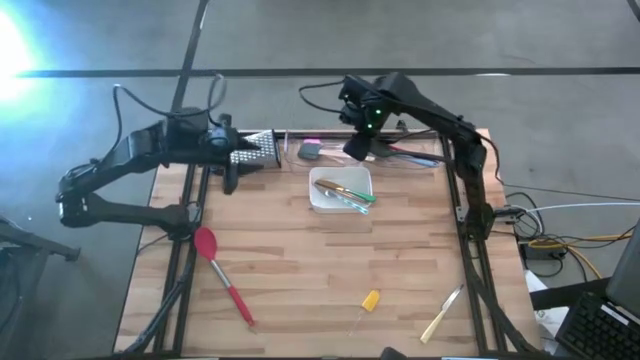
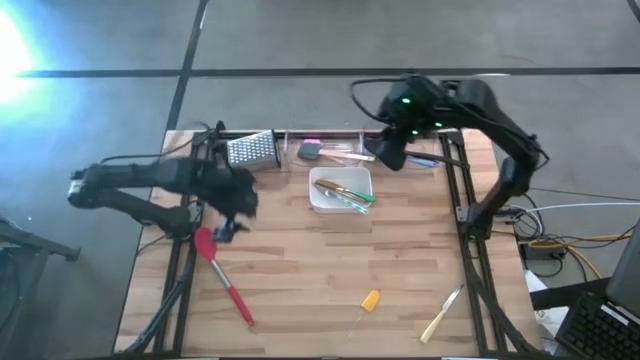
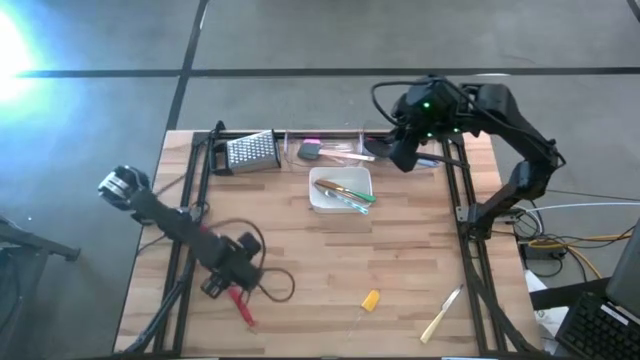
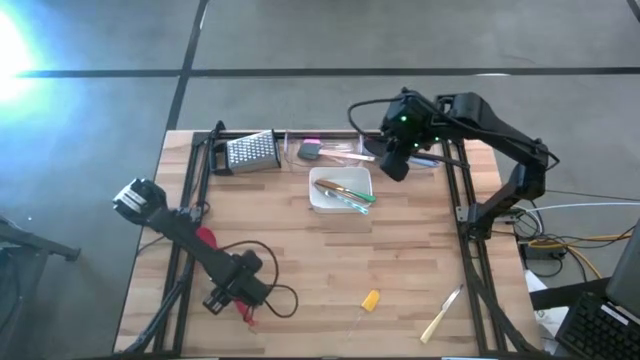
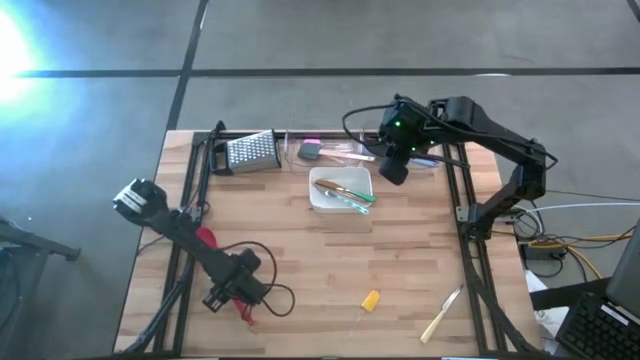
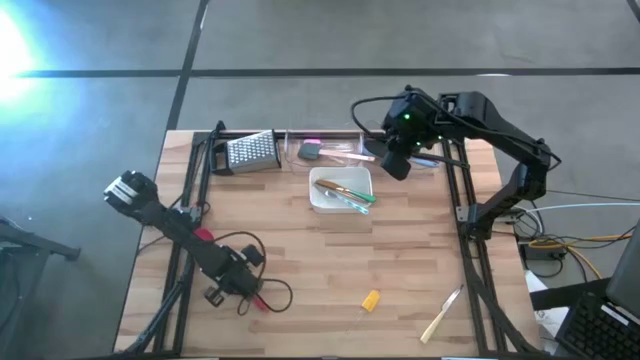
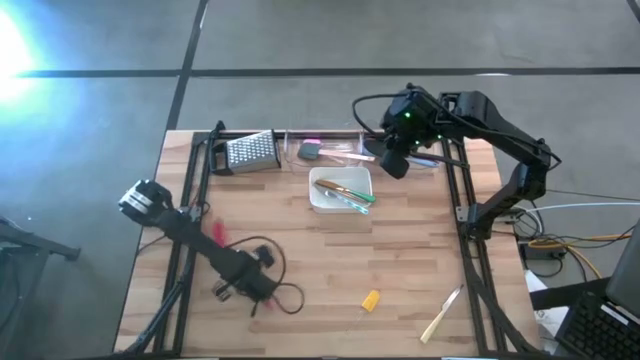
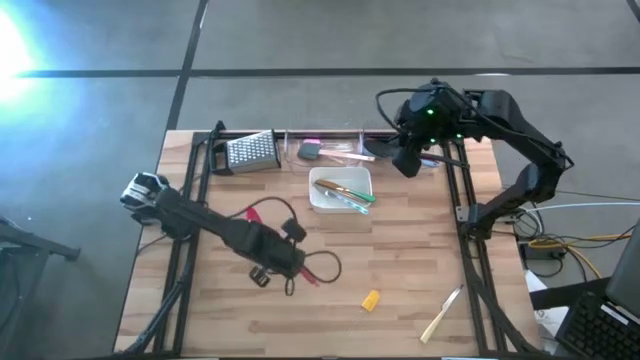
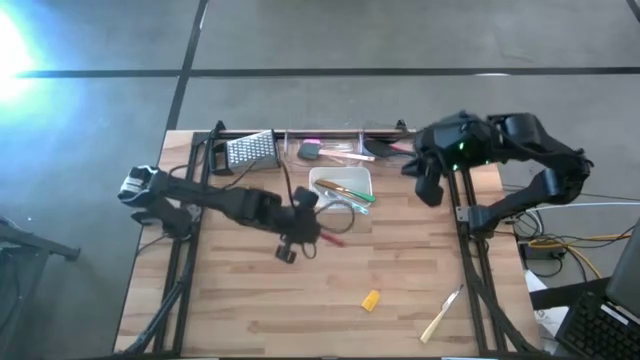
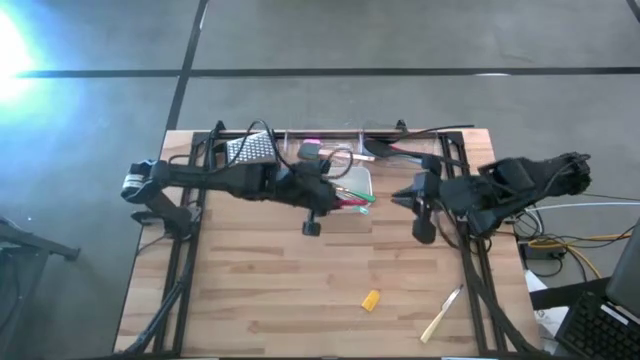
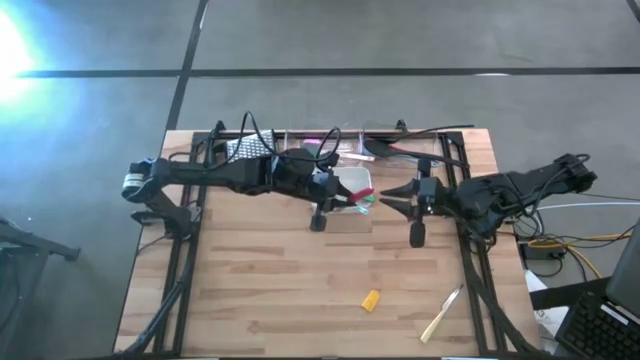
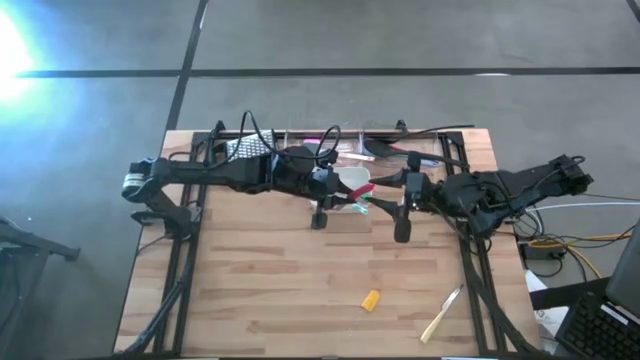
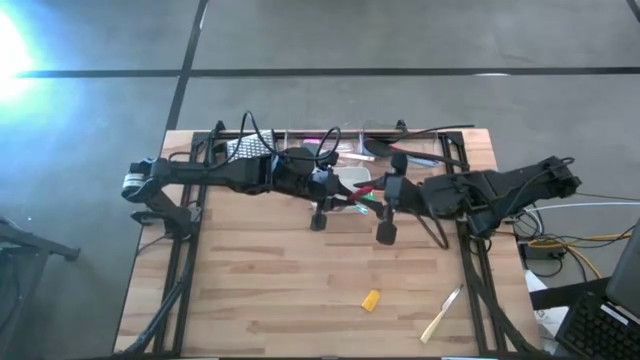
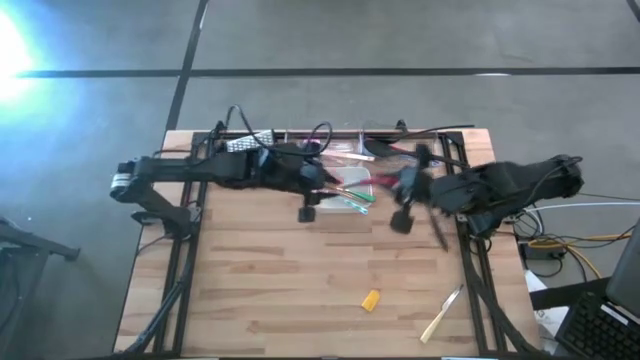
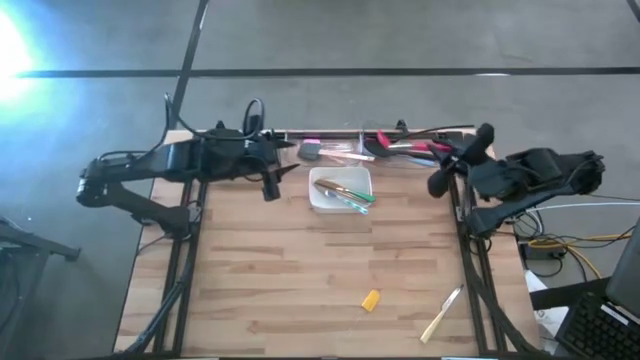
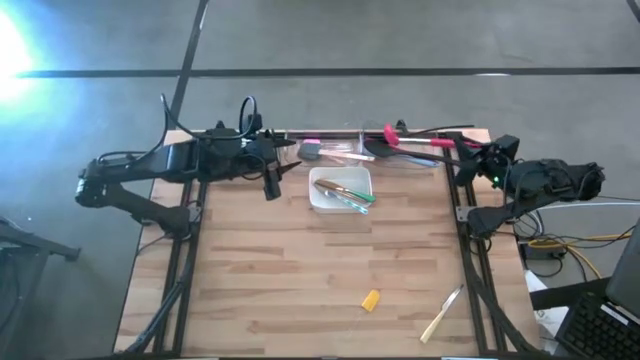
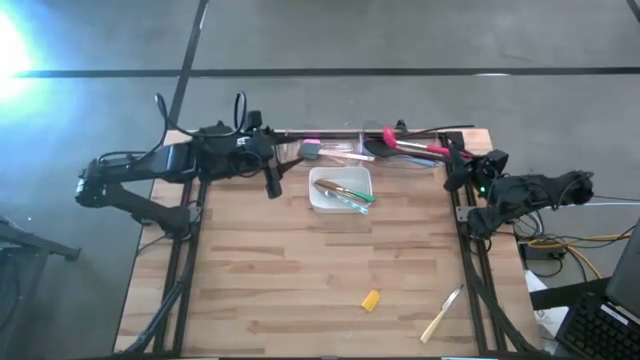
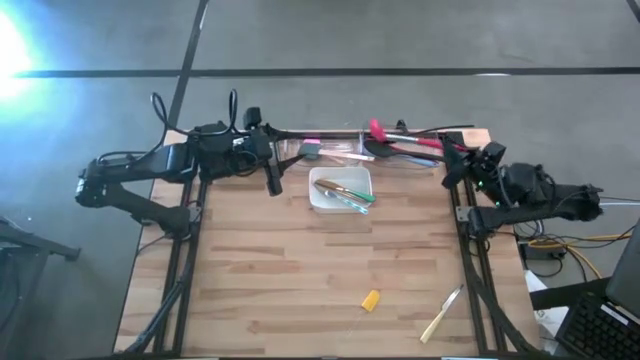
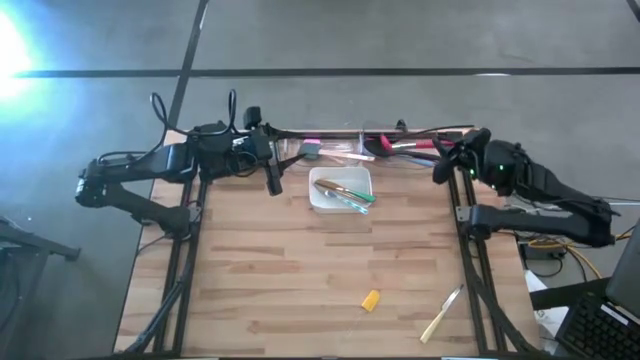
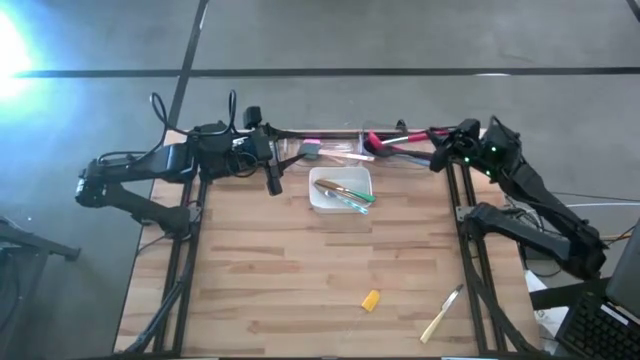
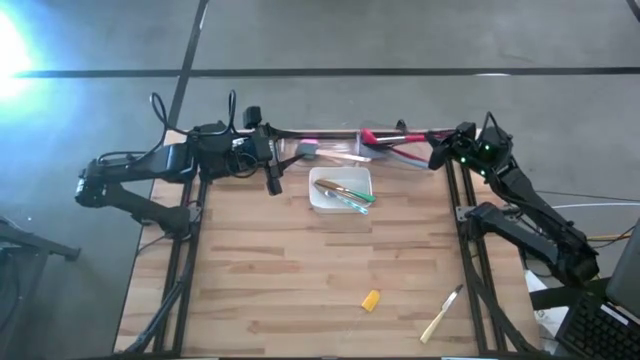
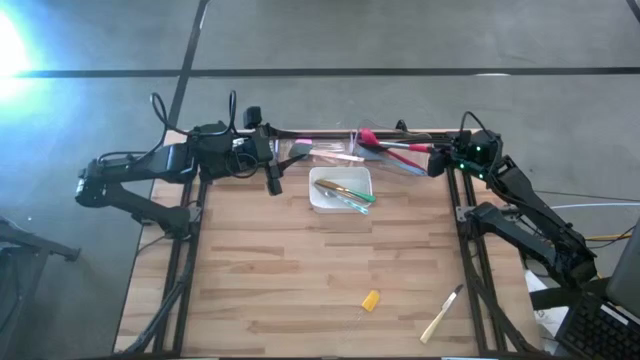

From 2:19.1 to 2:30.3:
Task: Pick & Place Kitchen Items
Put the pink serving spoon into the right transparent bin

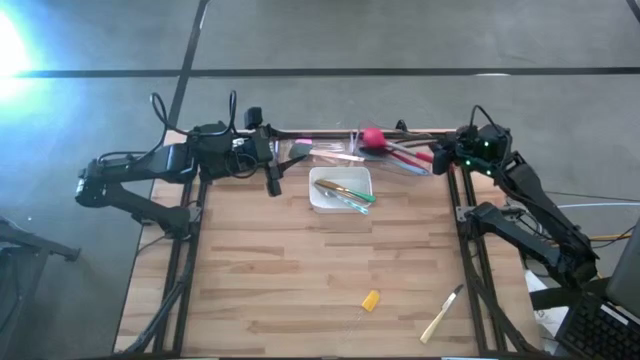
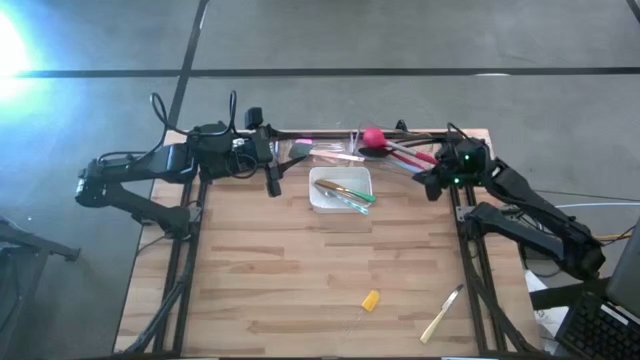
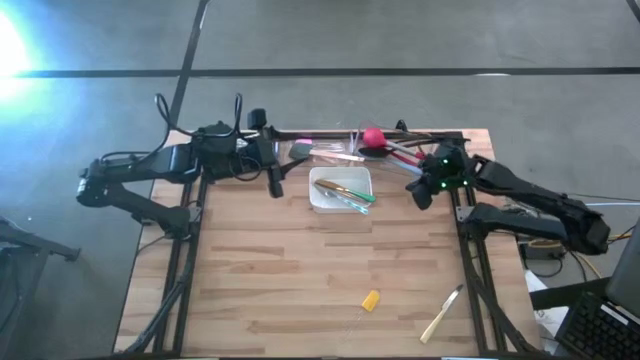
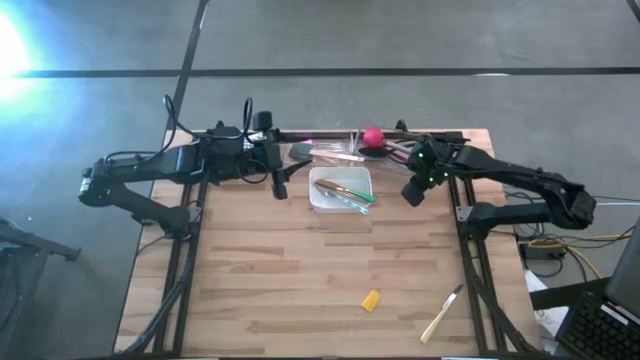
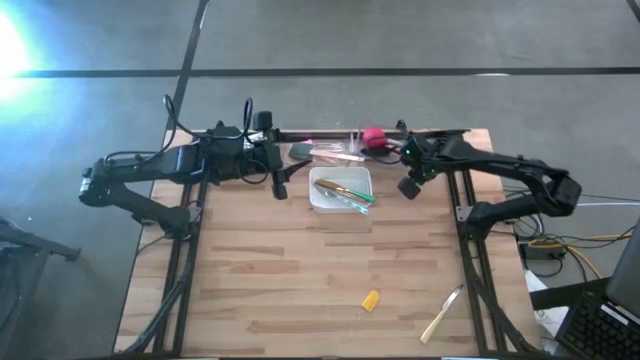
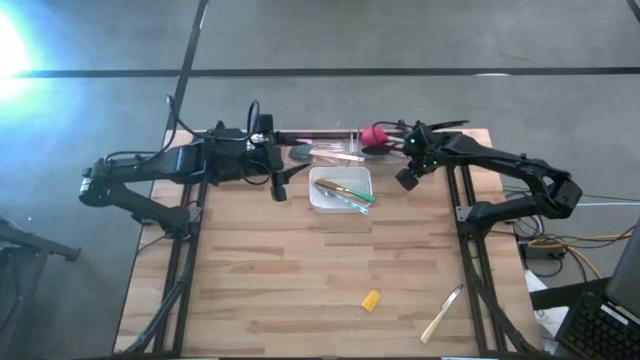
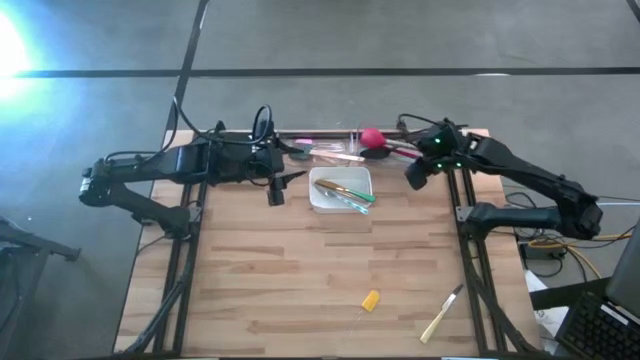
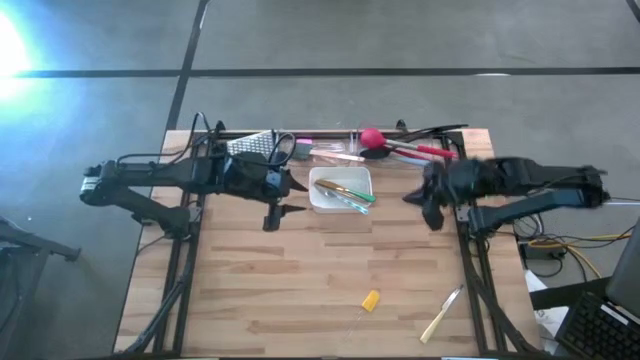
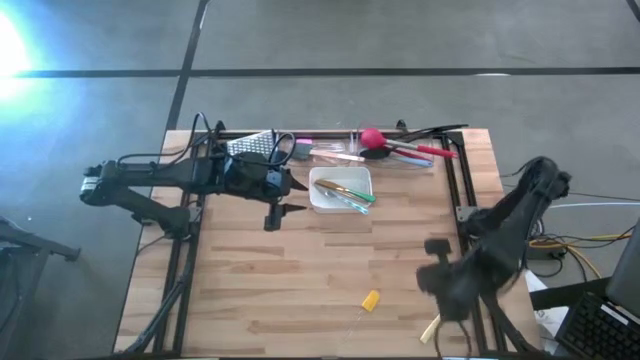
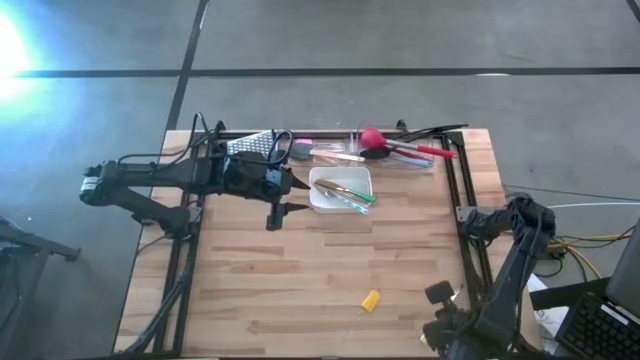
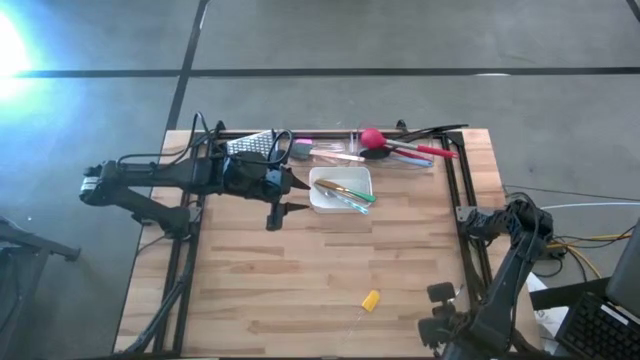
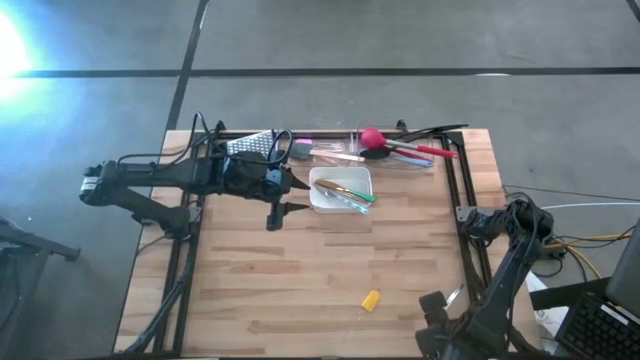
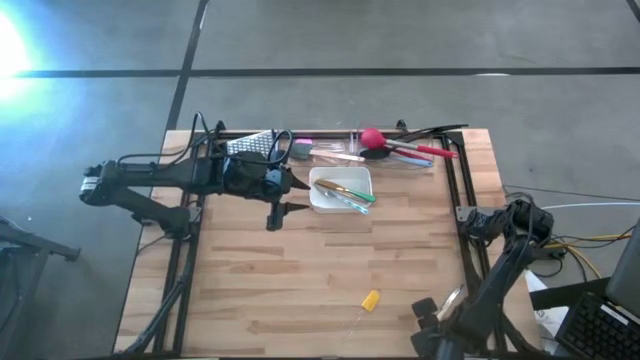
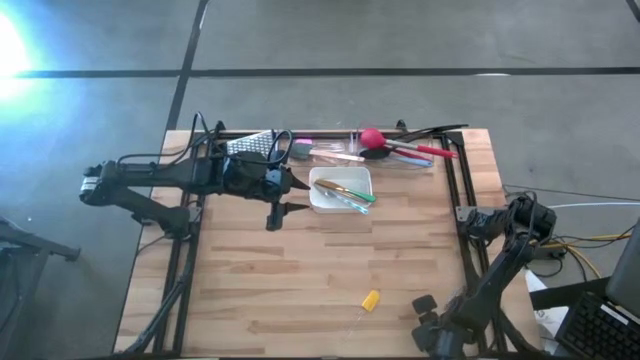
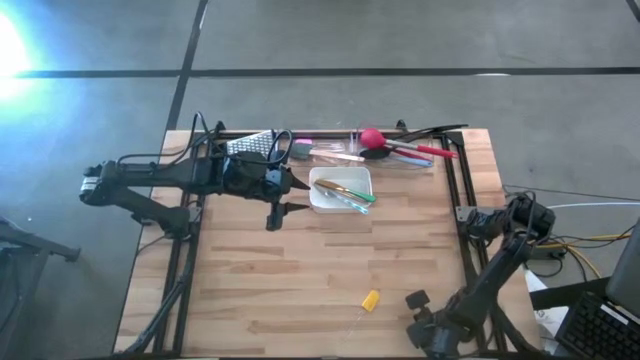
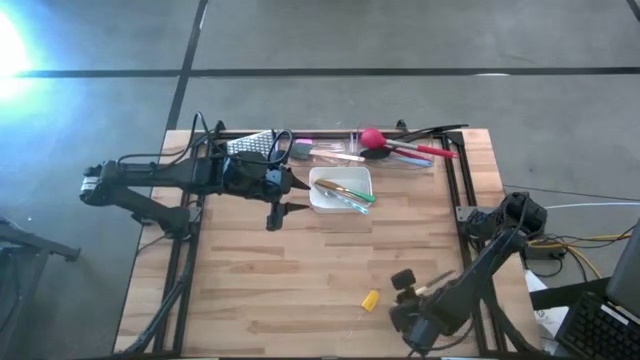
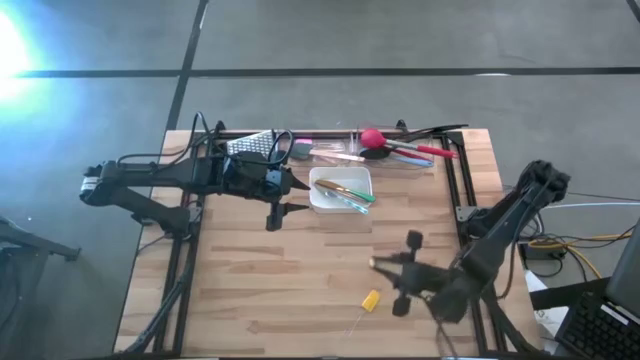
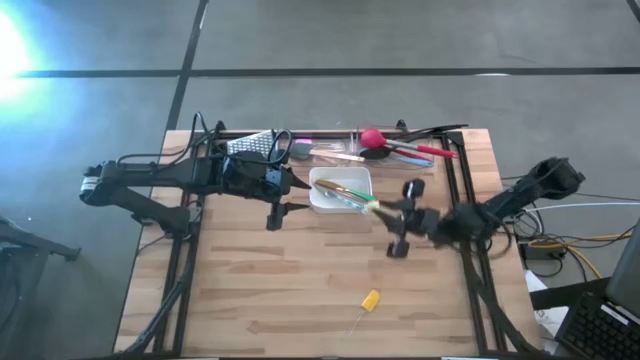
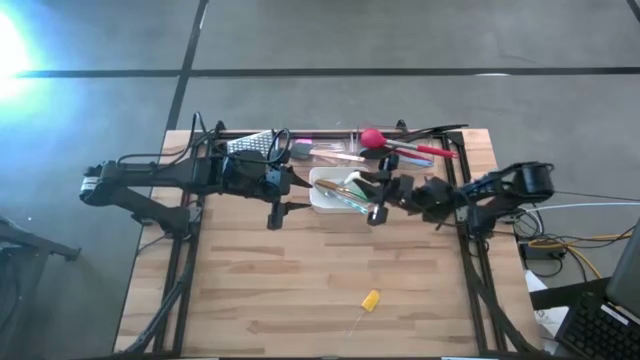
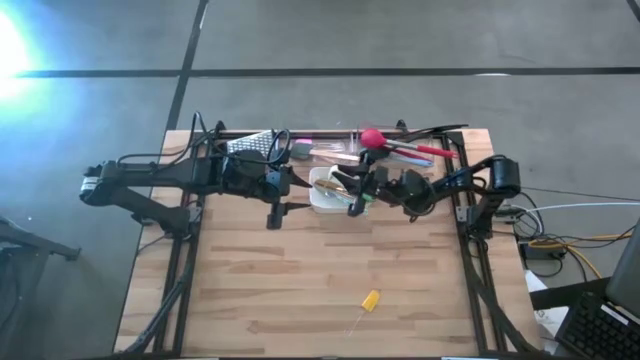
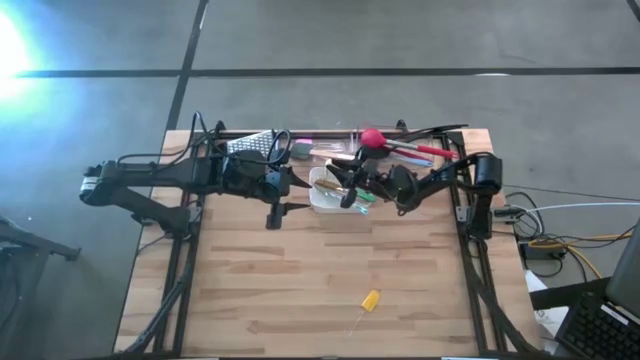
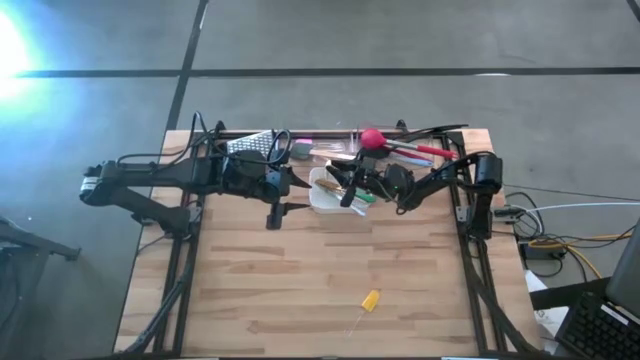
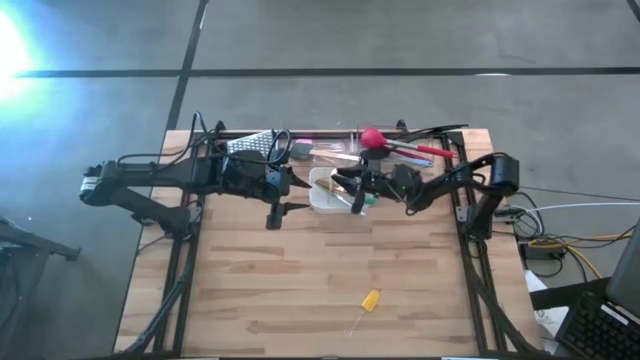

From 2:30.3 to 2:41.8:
Put the yellow knife into the white bin
